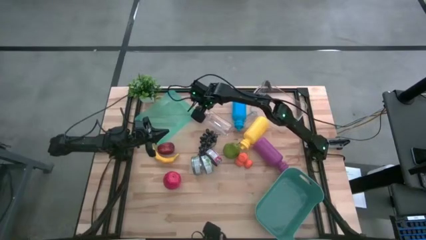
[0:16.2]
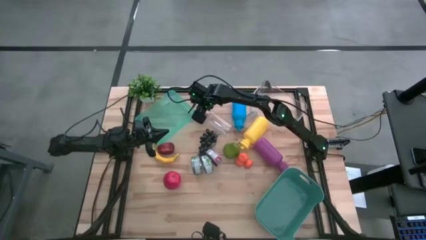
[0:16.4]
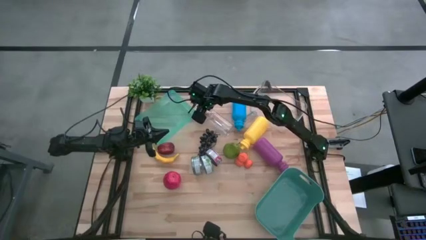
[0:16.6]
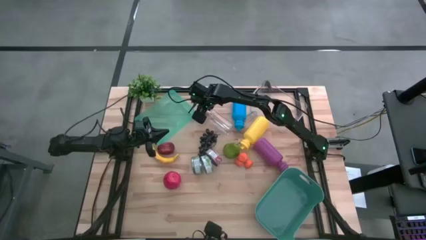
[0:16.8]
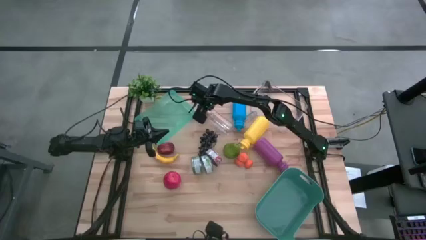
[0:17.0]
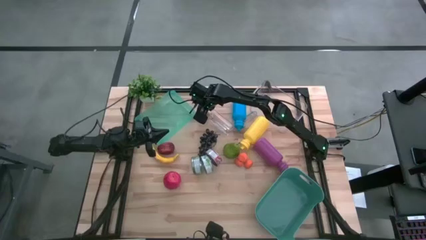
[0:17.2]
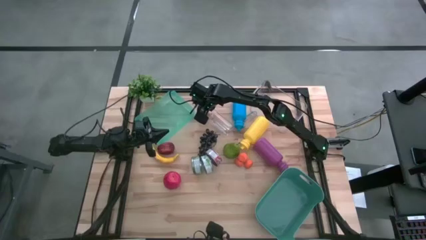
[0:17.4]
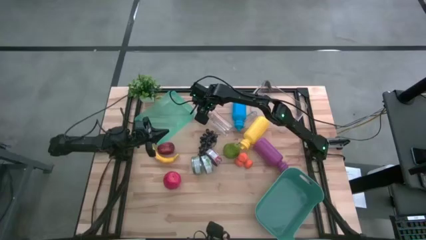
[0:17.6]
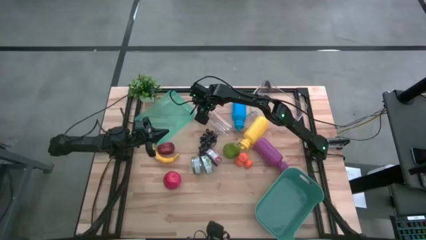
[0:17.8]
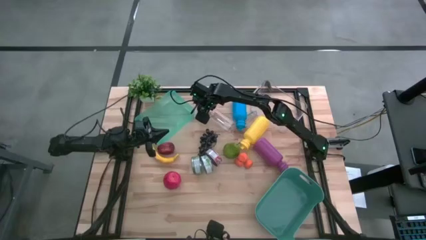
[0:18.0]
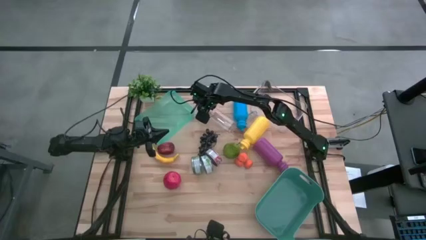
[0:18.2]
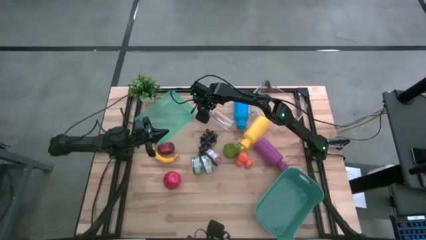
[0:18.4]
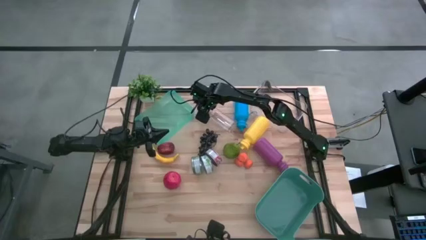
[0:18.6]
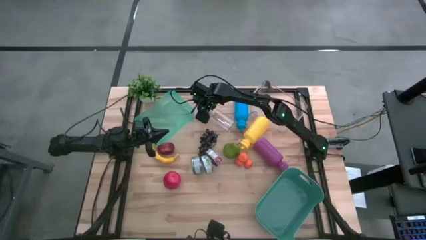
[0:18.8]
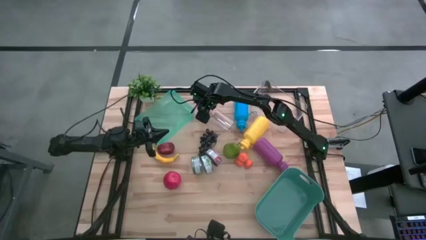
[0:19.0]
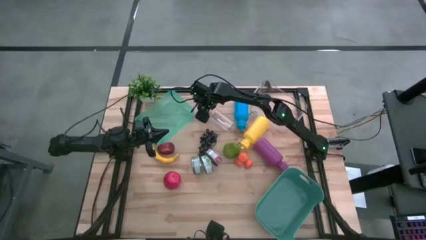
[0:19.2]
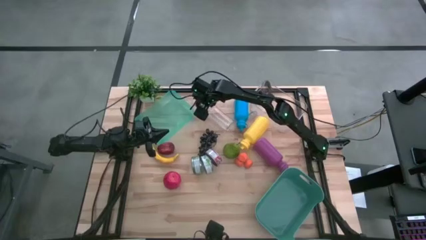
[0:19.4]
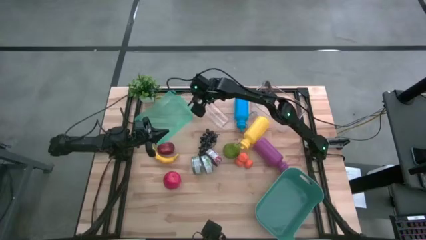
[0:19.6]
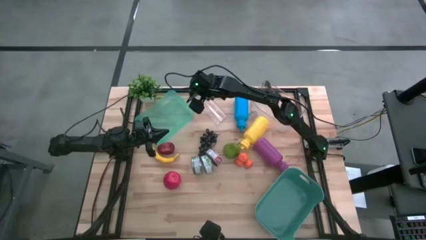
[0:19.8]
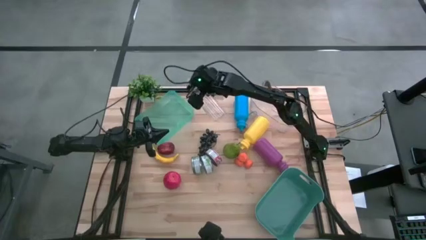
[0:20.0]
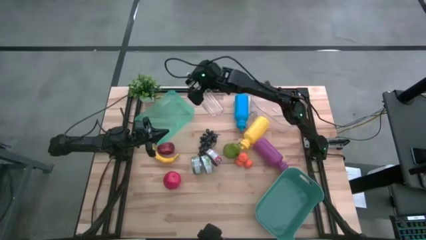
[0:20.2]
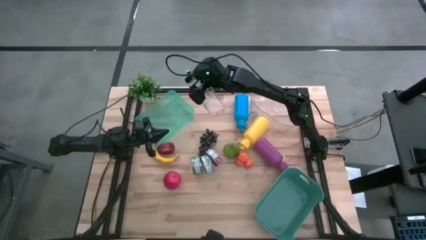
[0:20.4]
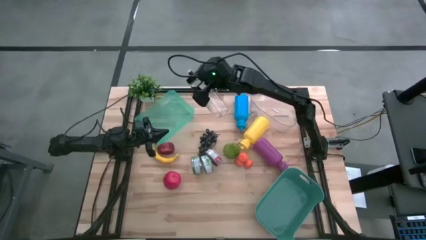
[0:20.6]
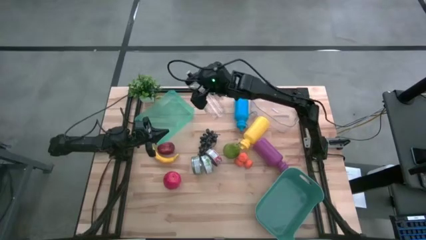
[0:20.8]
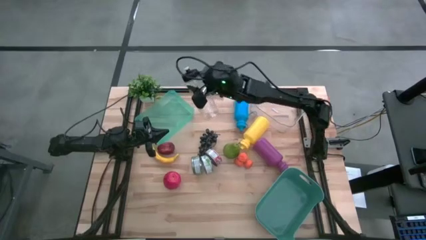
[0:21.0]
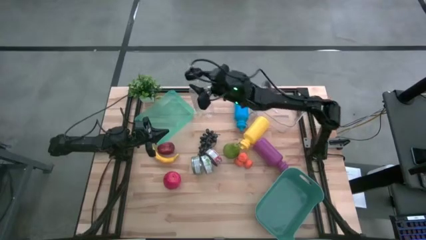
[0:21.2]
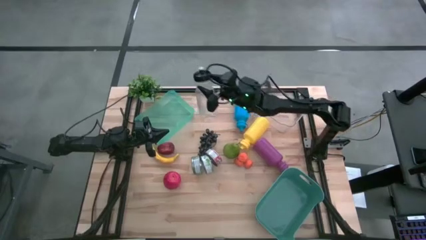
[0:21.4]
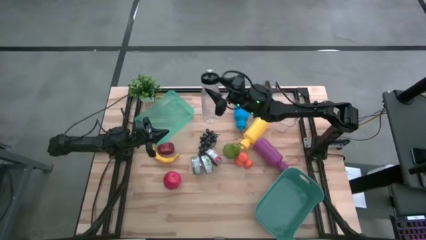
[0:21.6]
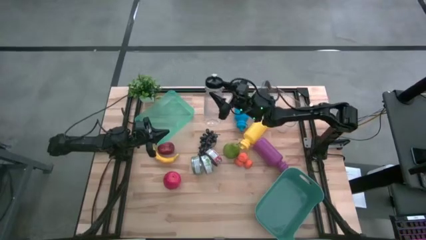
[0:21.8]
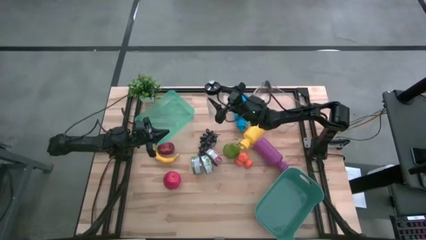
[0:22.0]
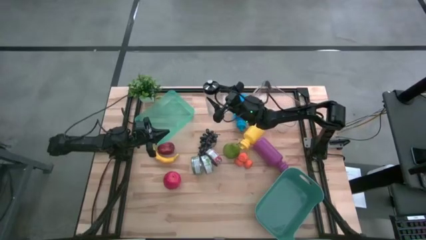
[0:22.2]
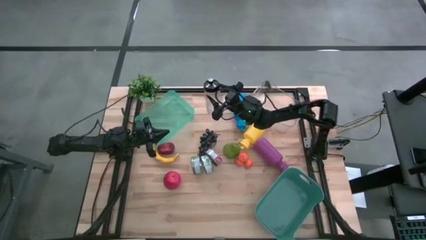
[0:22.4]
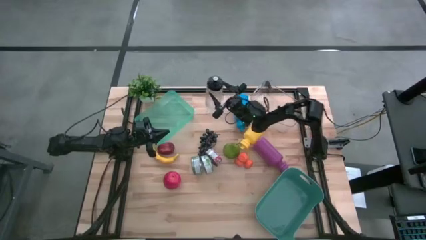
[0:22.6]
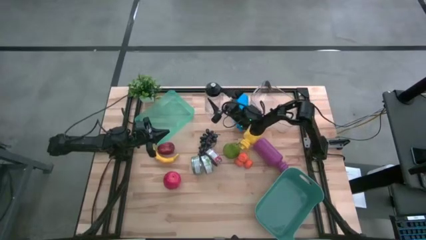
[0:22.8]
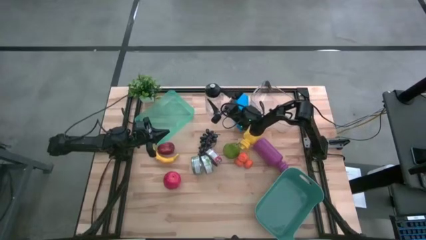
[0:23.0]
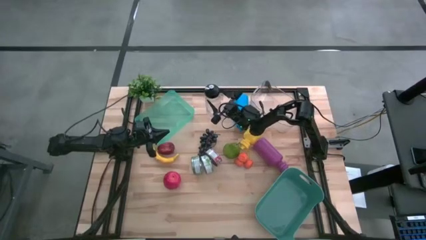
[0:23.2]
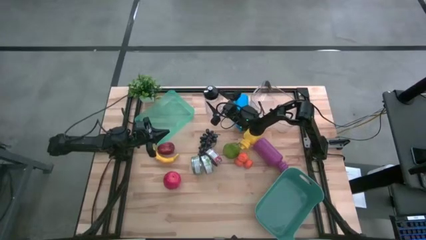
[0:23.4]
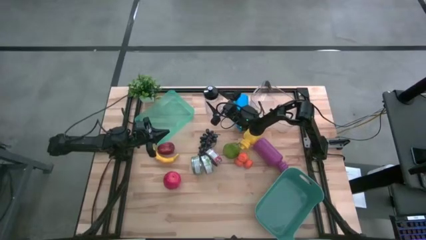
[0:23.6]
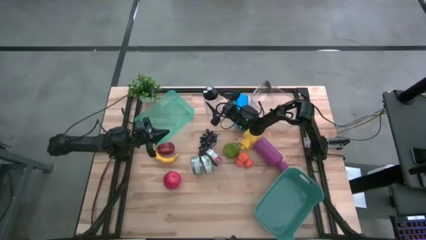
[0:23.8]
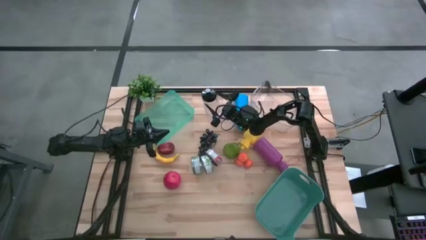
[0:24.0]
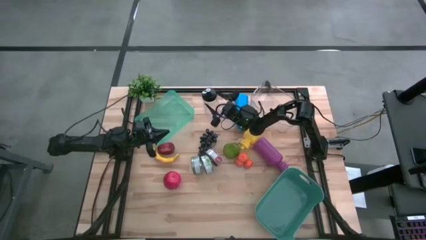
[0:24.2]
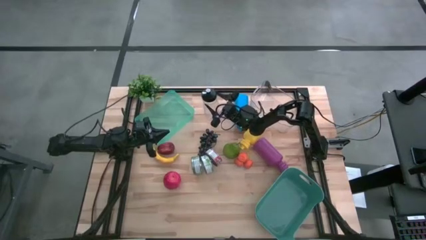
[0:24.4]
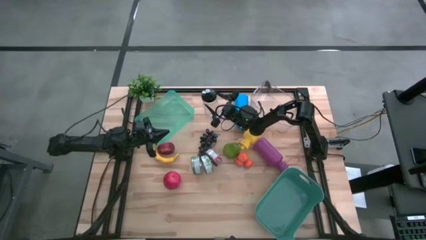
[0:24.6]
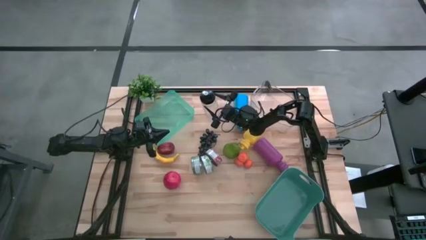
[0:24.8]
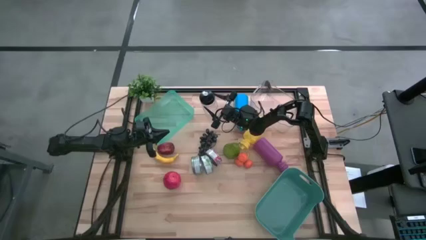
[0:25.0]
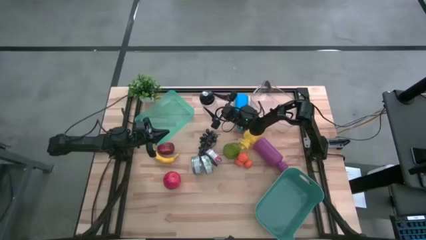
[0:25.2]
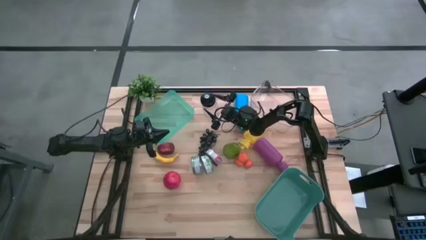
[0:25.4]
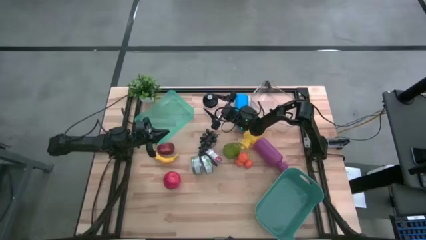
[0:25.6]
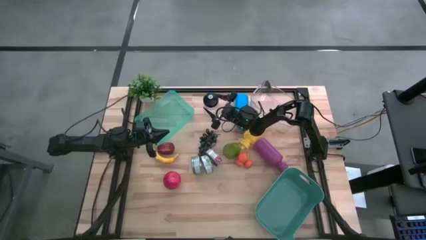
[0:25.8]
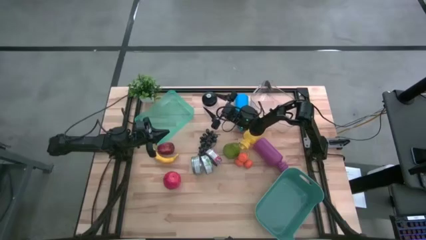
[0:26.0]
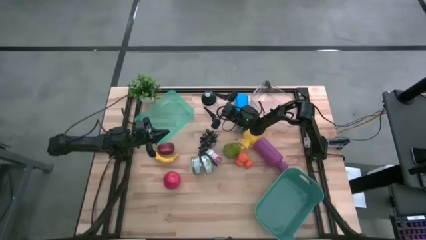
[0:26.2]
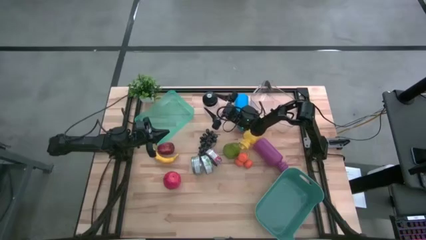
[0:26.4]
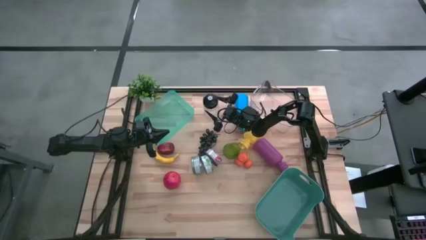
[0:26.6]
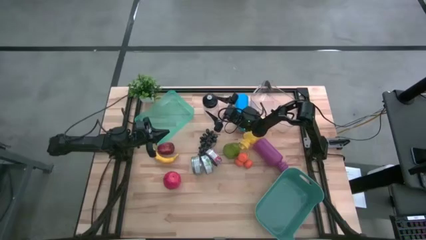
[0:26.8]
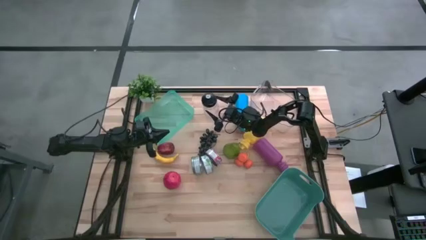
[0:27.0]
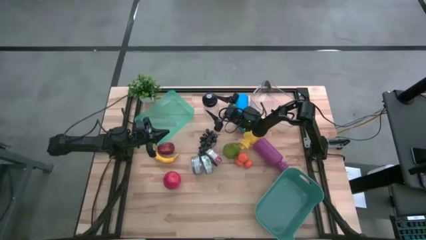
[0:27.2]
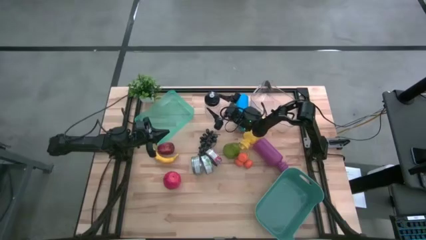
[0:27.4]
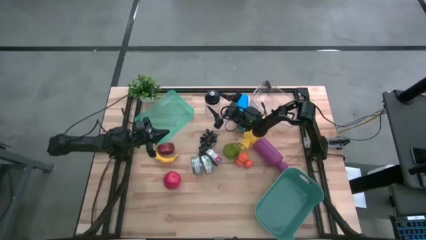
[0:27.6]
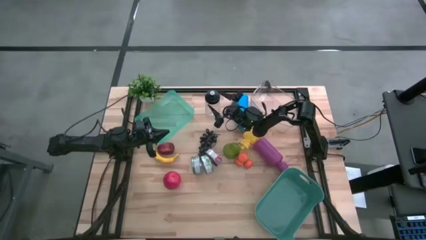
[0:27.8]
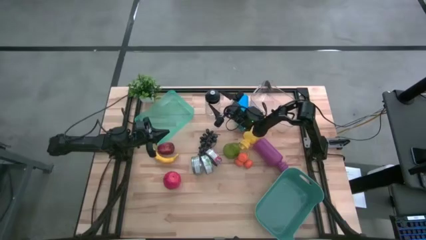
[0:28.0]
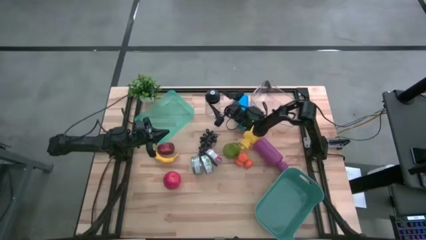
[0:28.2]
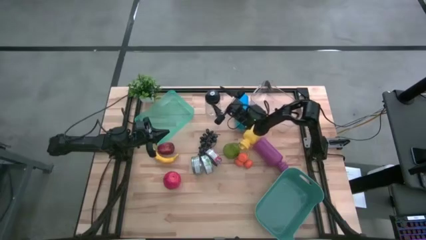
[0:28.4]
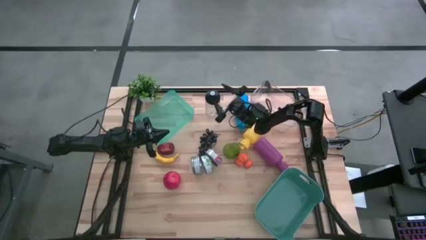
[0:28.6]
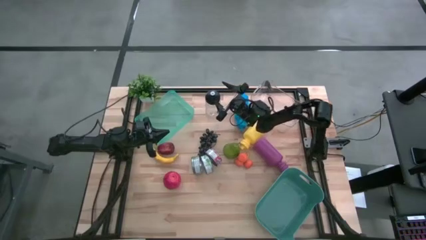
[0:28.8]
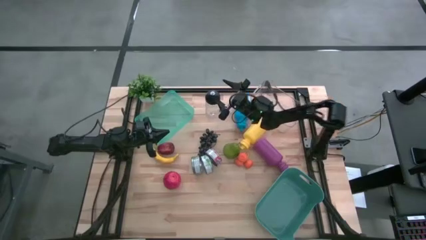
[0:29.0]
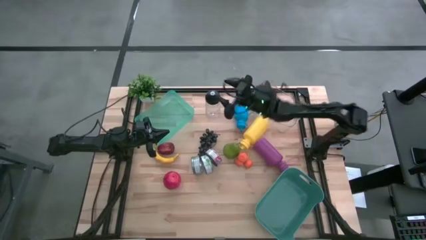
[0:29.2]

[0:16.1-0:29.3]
Task: Pick & Place Food Item
Put the transparent water bottle into the transparent bin
